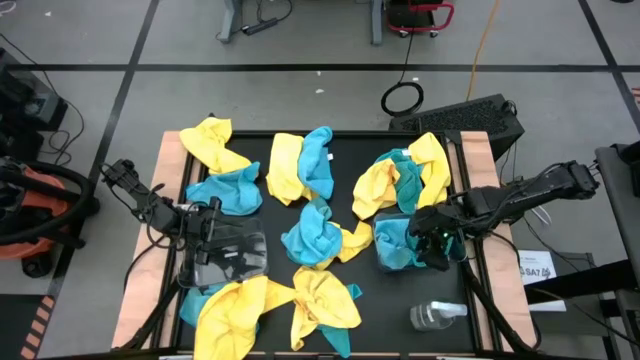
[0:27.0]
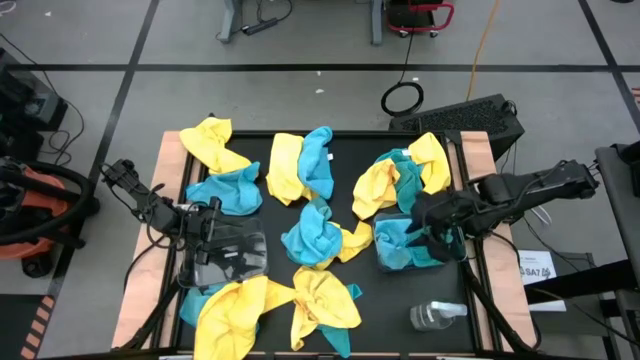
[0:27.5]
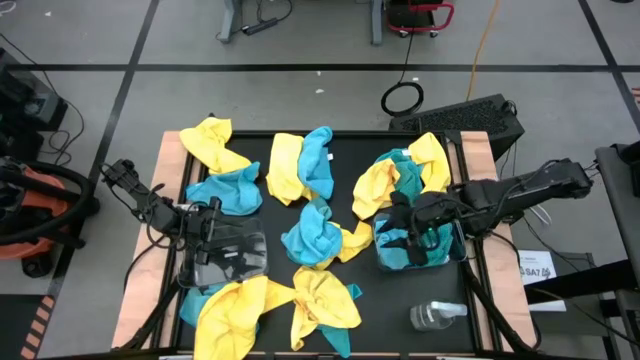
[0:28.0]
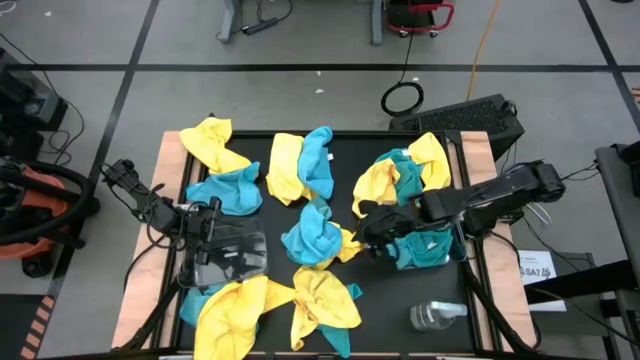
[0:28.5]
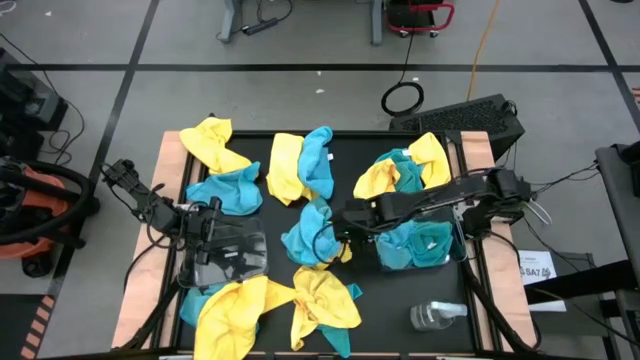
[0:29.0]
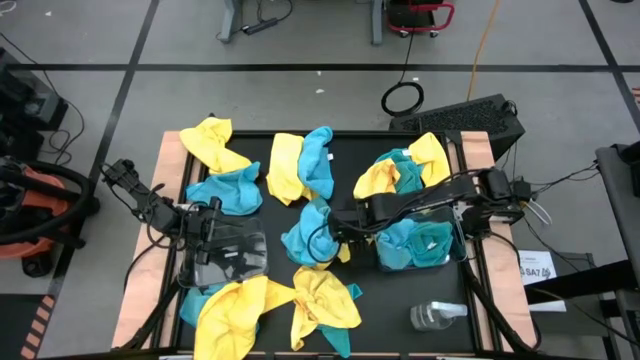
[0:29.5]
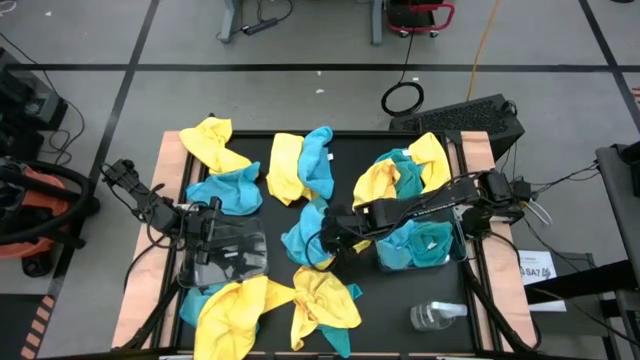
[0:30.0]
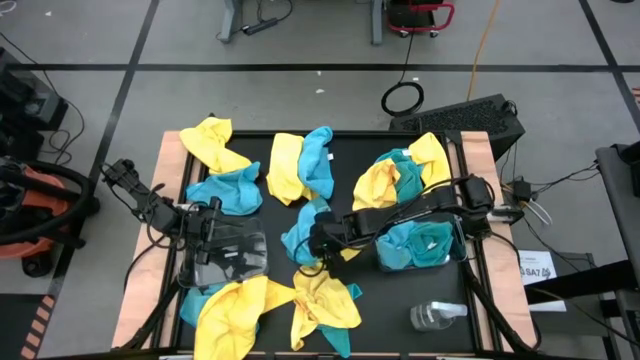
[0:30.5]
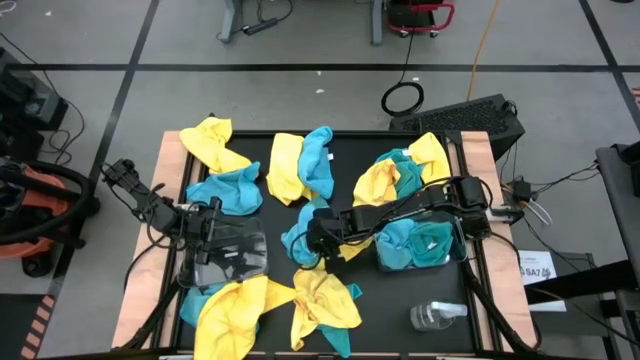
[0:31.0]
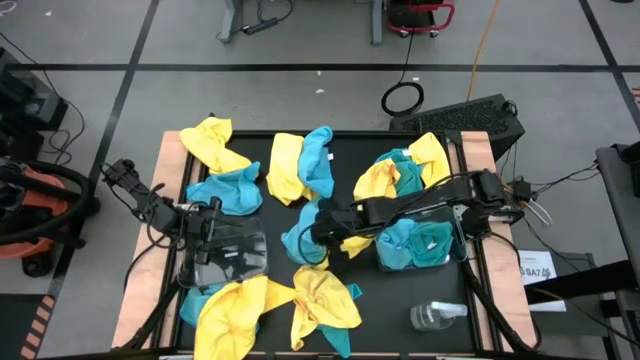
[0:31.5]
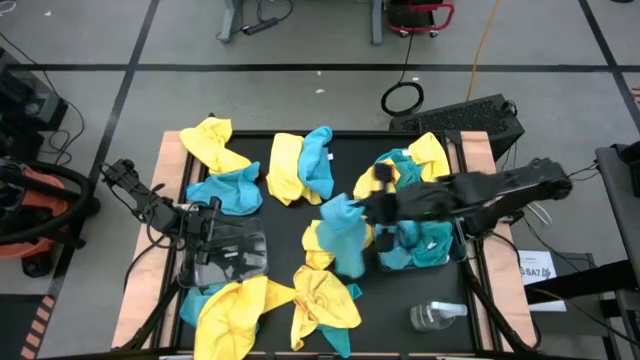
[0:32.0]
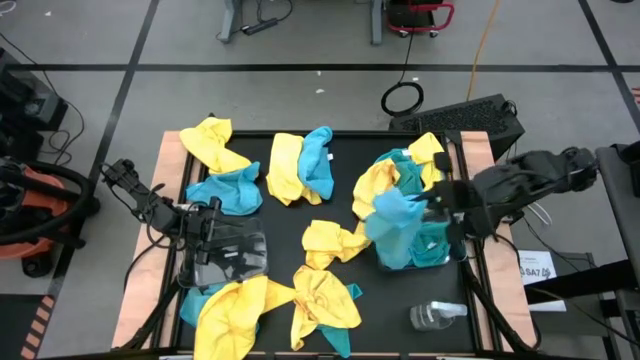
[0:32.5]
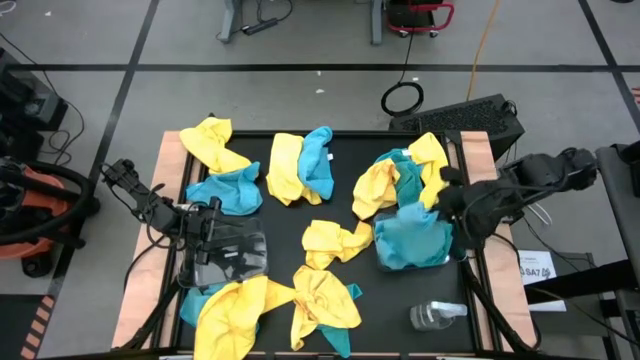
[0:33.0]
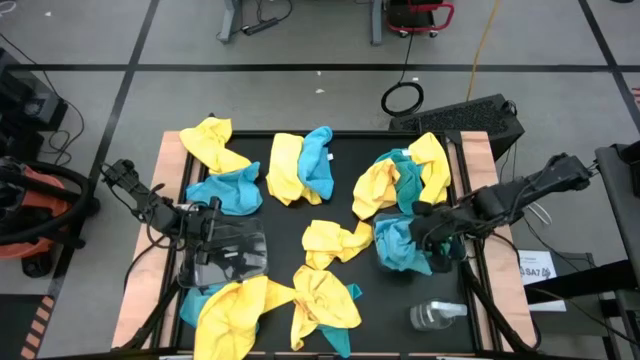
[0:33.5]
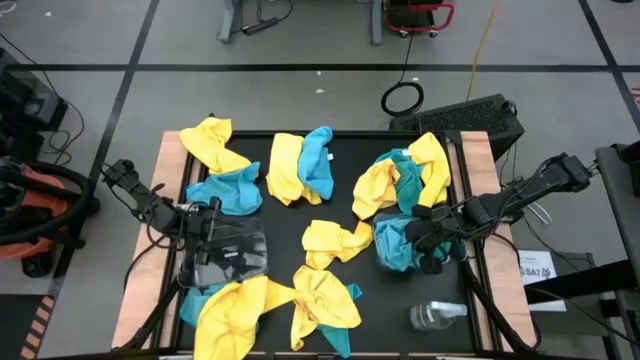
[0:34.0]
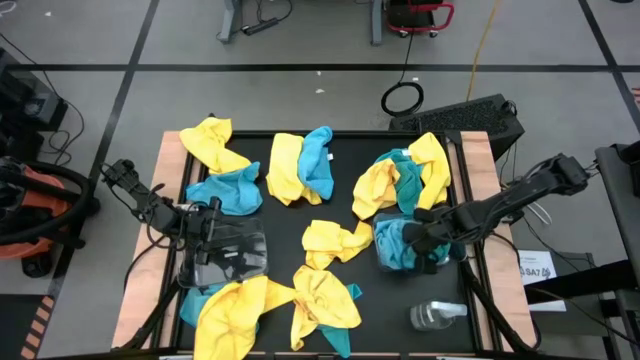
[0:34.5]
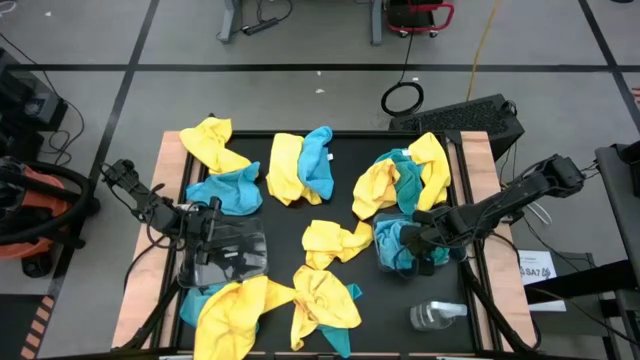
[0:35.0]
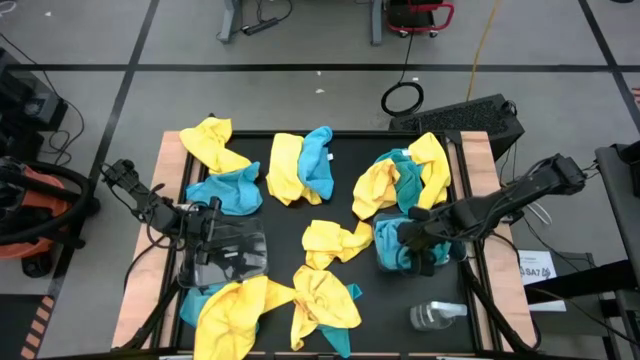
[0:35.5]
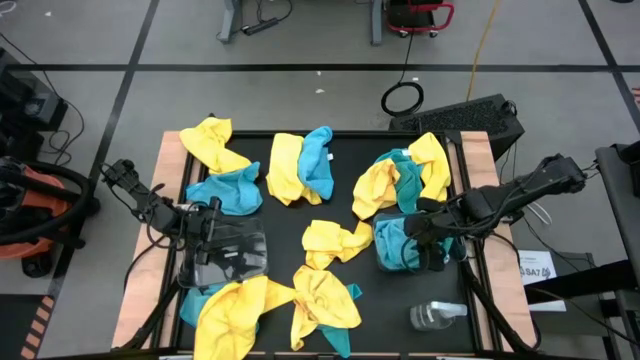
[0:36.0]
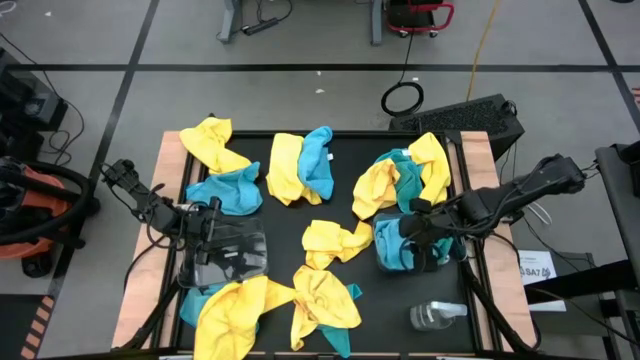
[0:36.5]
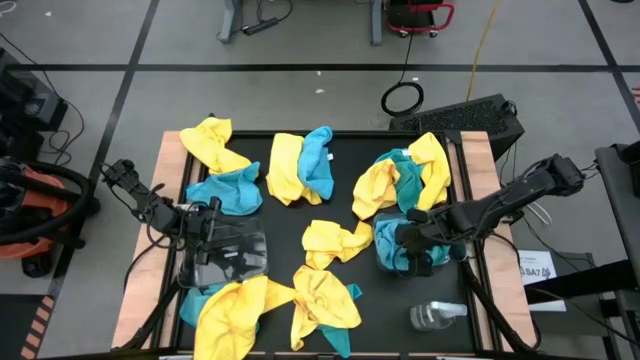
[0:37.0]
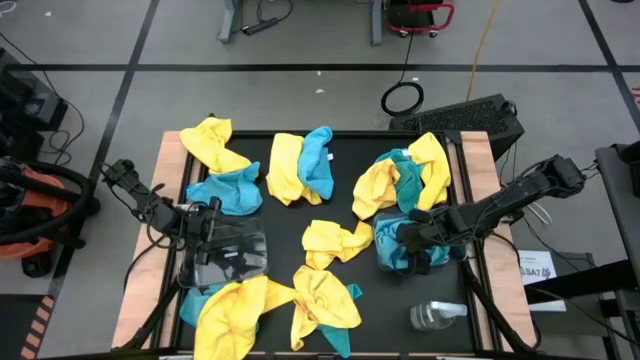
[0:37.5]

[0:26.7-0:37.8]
Task: Sort microfiber towel by color & place in baskets
Put the blue microfiber towel into the right transparent bin

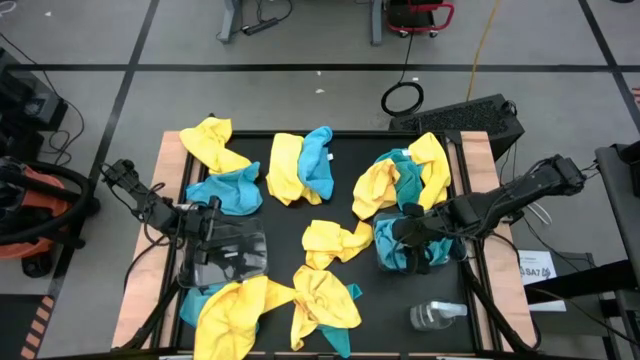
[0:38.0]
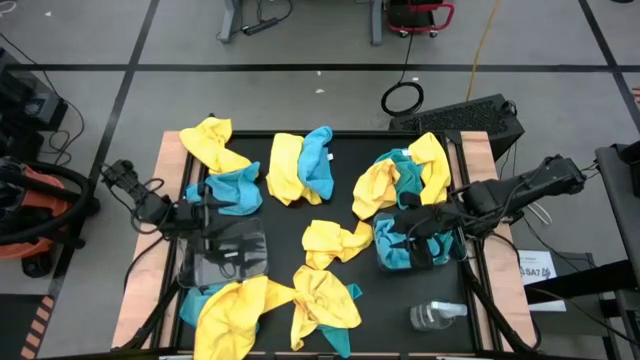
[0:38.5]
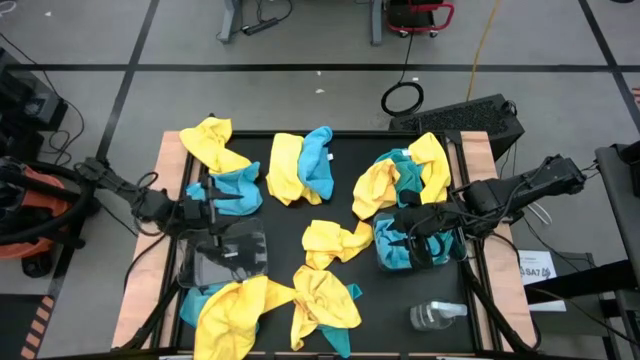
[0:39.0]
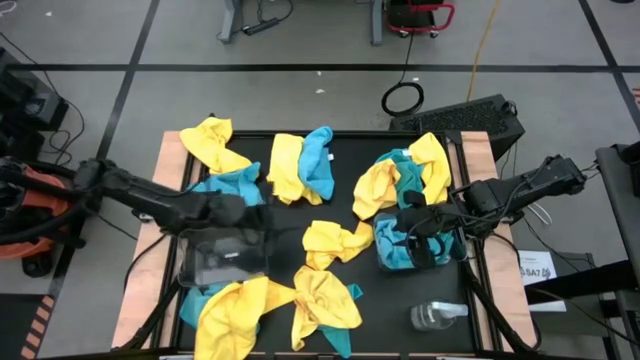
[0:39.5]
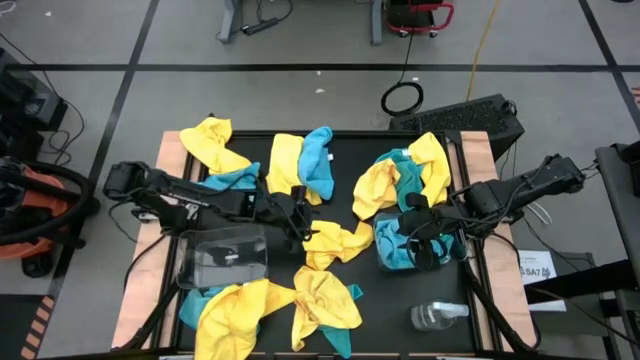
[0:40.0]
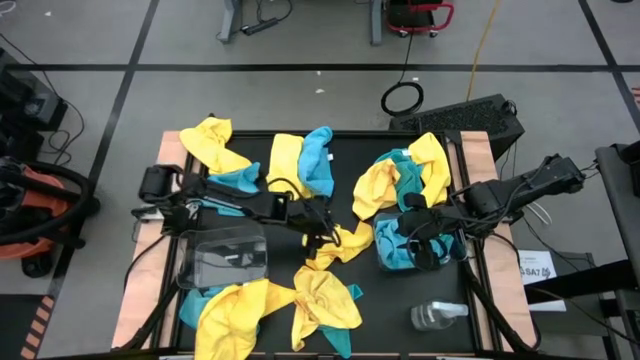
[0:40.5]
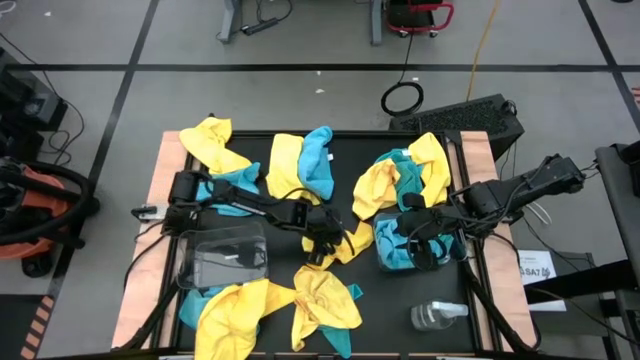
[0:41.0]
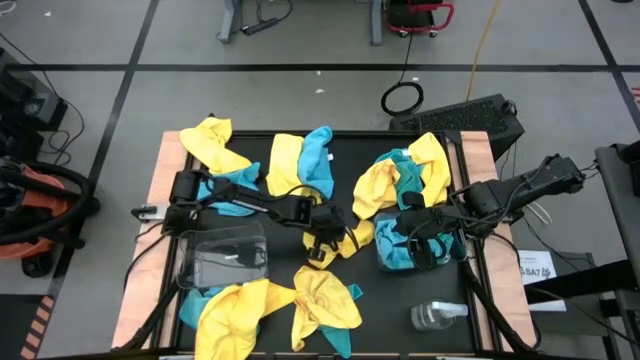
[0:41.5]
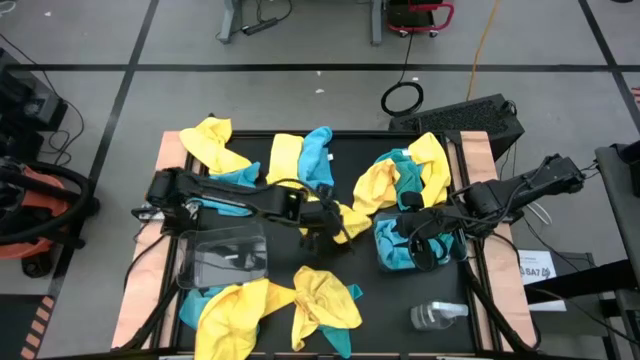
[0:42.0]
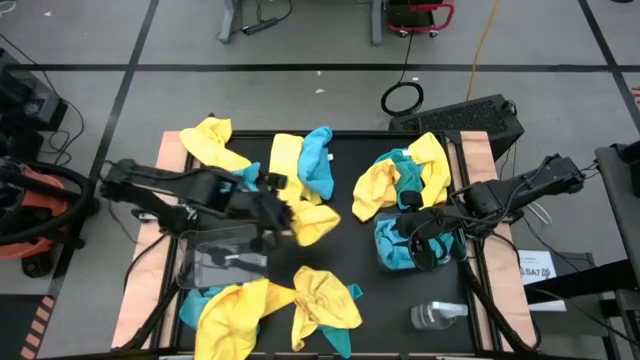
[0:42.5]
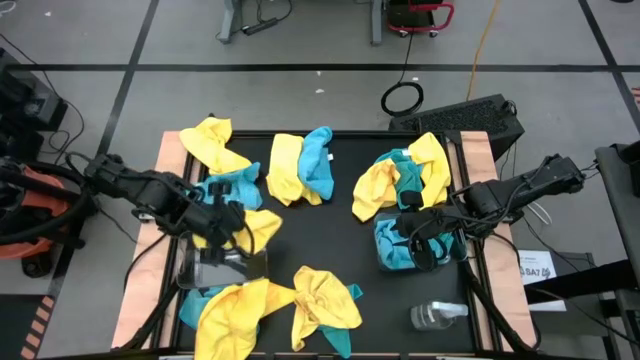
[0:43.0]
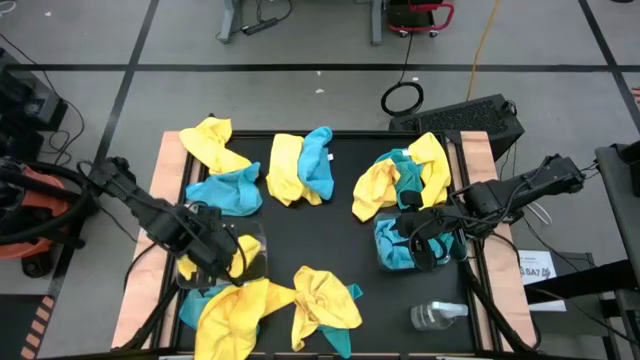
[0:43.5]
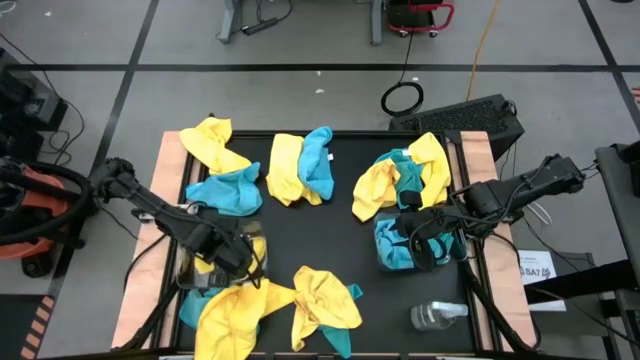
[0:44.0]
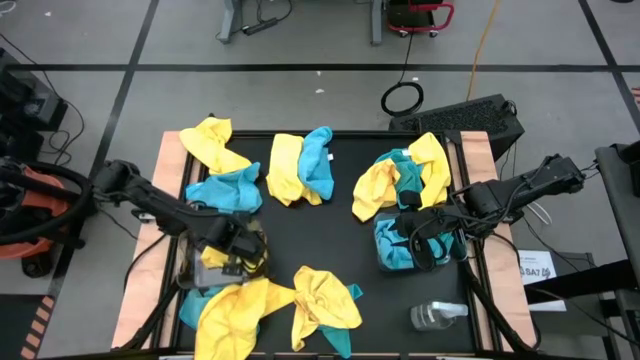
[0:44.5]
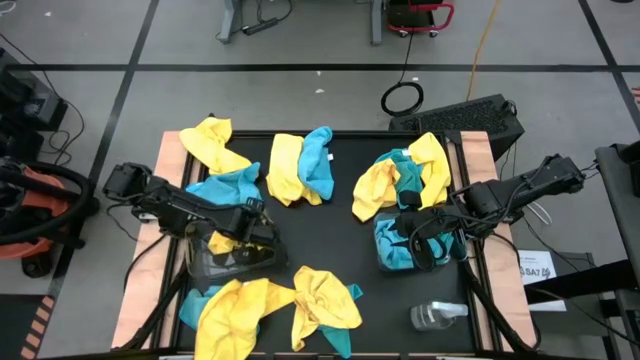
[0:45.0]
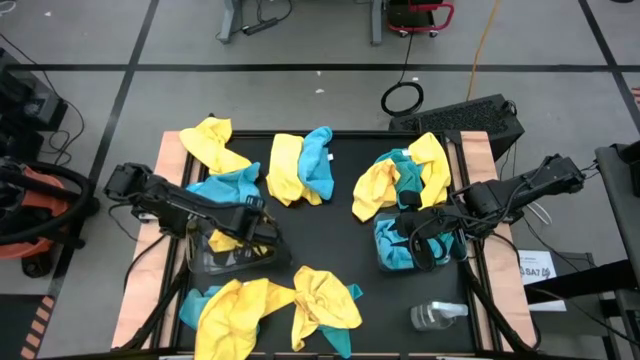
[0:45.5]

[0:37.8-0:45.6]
Put the yellow microfiber towel into the left transparent bin

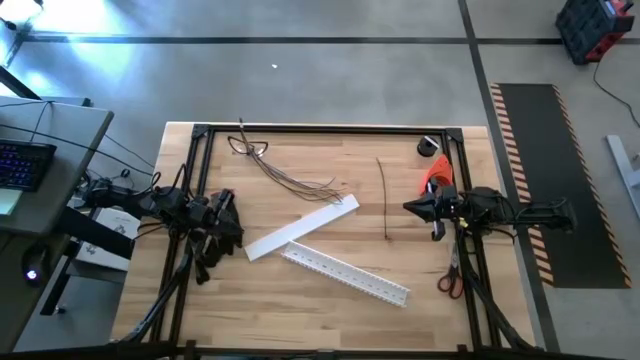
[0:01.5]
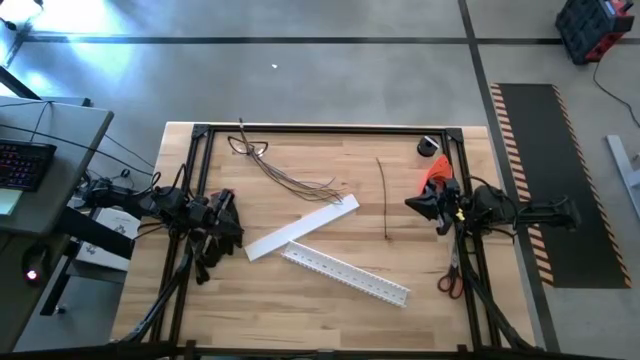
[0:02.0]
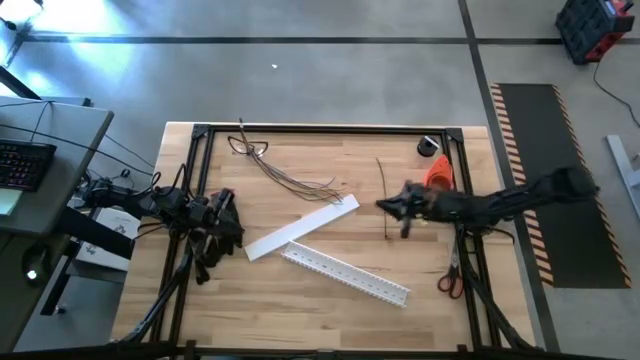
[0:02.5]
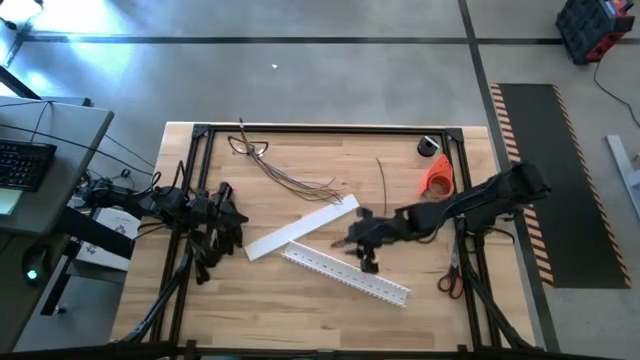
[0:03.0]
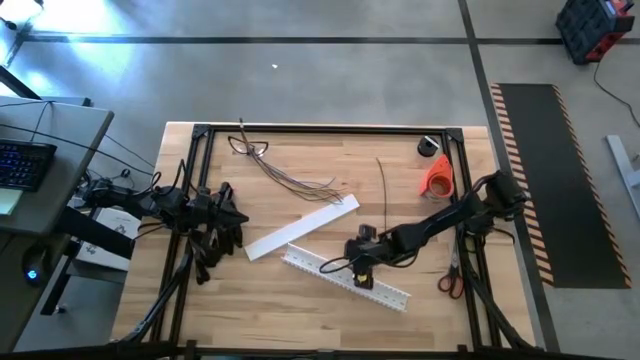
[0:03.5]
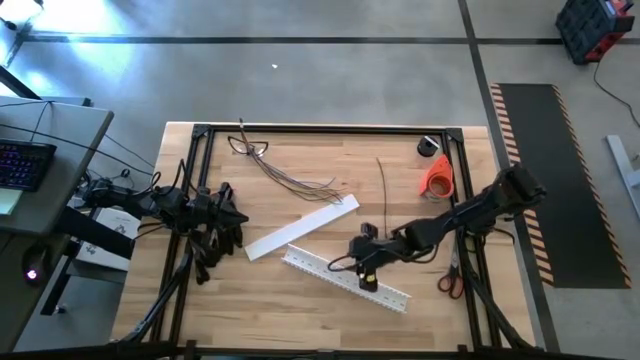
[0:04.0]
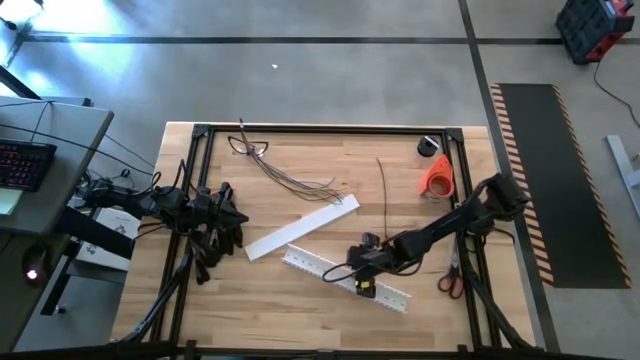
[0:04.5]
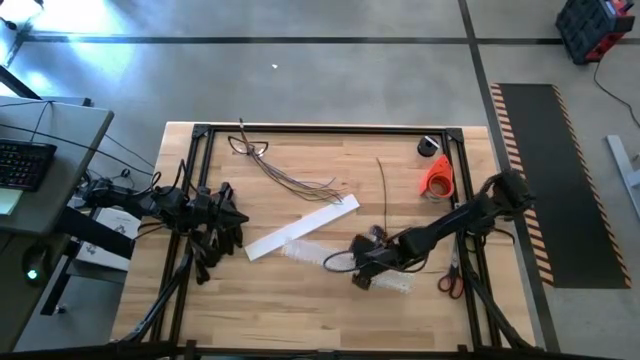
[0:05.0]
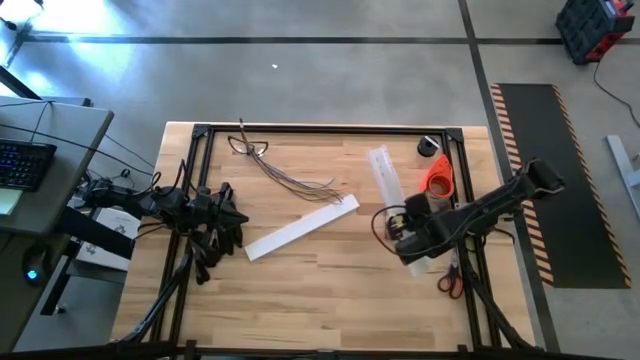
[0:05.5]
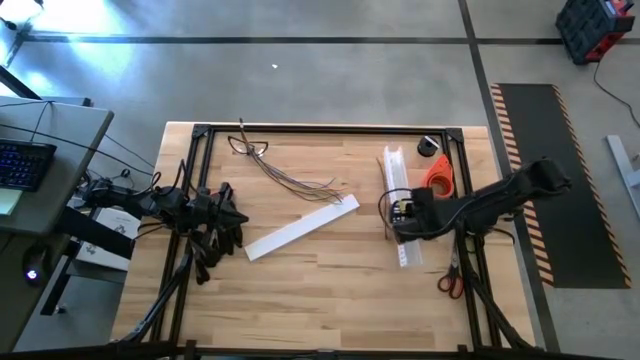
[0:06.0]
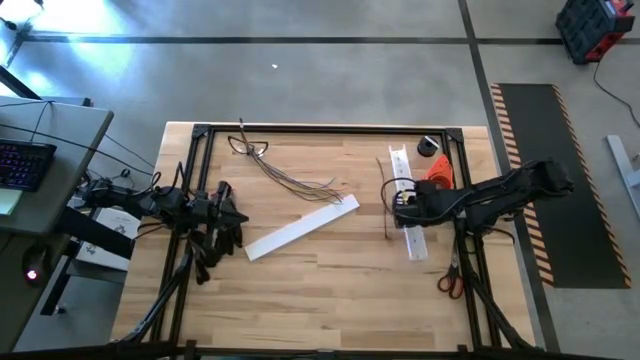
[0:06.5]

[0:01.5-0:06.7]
Task: Ziptie cables
Move the white cable duct from bottom center of the table to the top right side of the table
